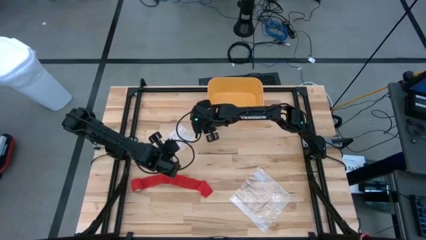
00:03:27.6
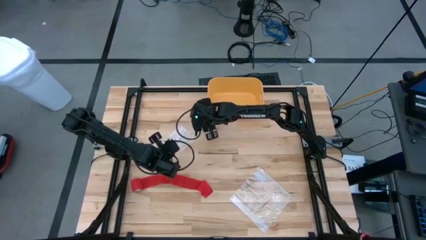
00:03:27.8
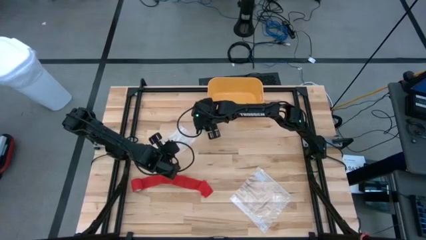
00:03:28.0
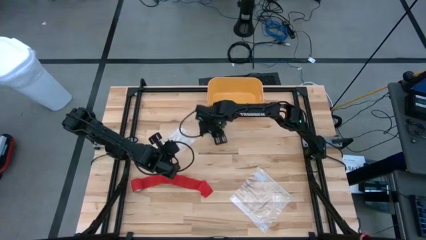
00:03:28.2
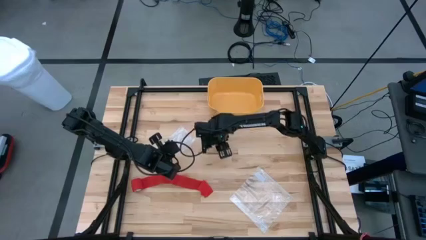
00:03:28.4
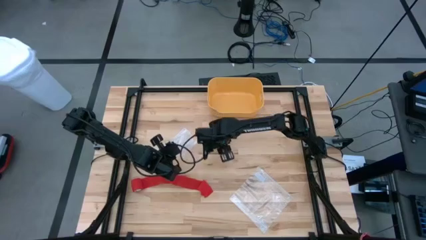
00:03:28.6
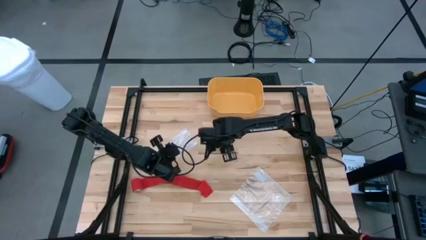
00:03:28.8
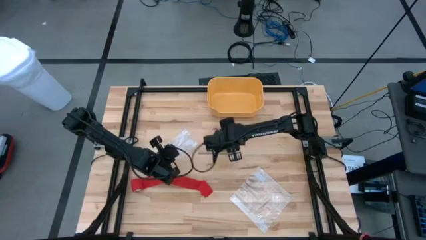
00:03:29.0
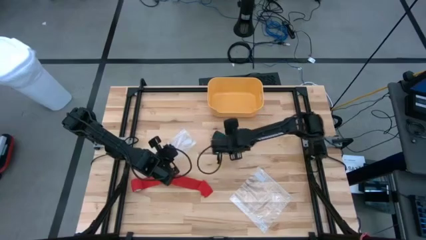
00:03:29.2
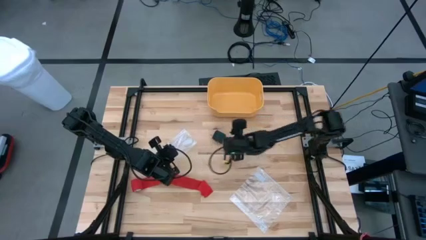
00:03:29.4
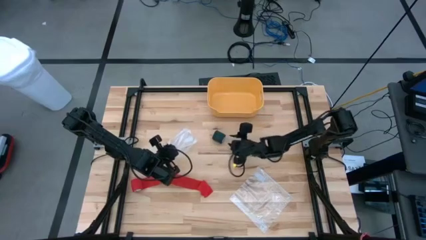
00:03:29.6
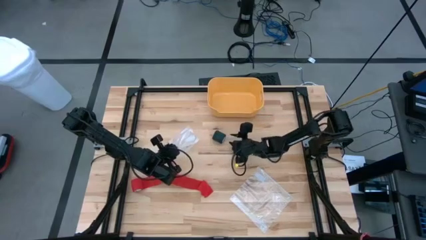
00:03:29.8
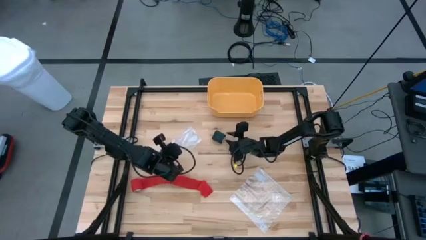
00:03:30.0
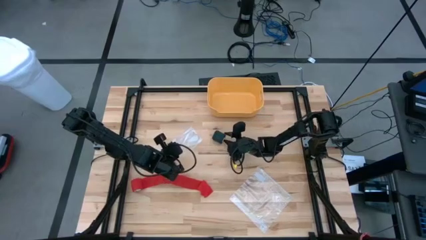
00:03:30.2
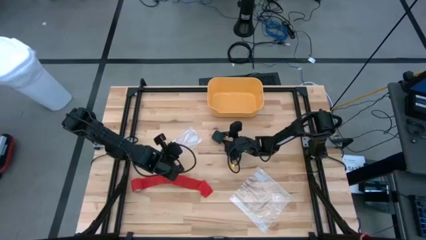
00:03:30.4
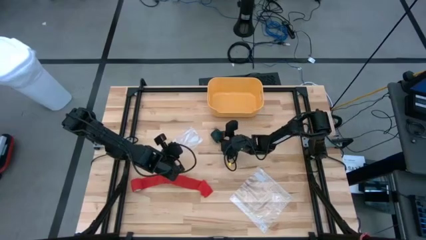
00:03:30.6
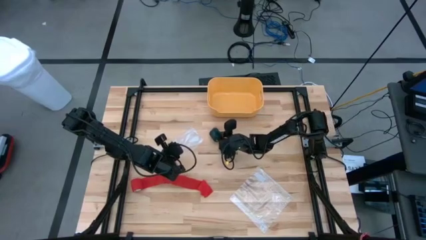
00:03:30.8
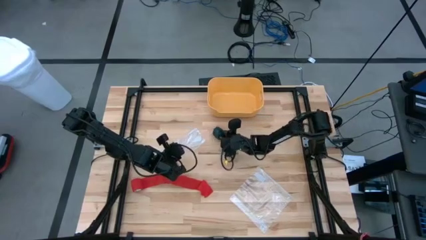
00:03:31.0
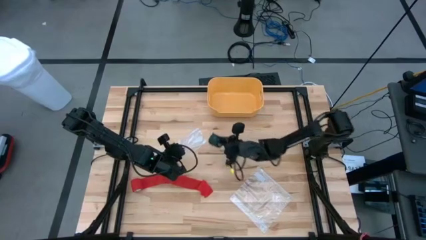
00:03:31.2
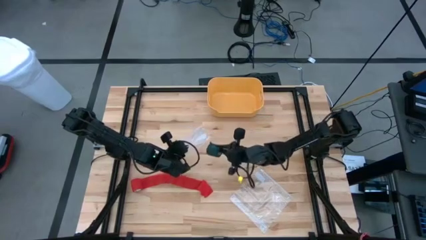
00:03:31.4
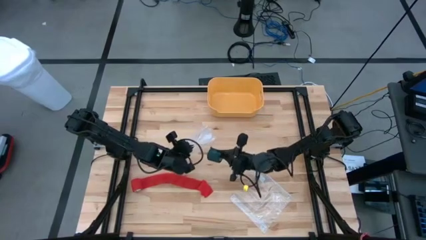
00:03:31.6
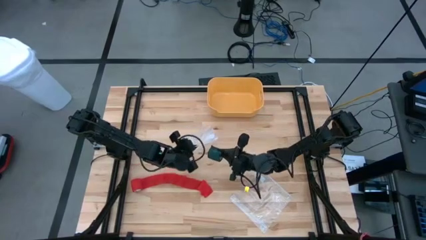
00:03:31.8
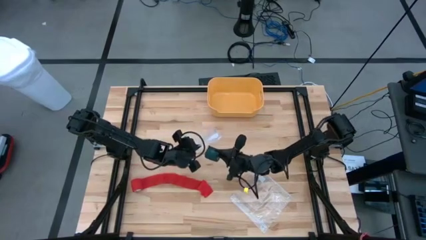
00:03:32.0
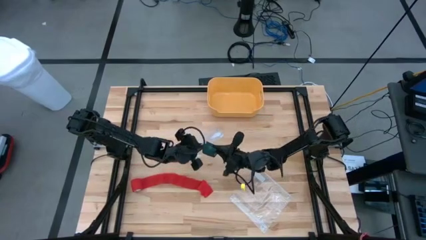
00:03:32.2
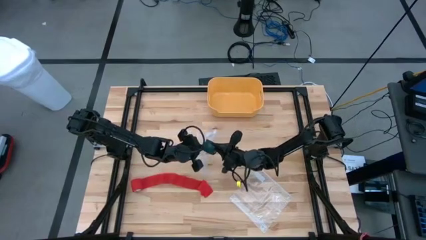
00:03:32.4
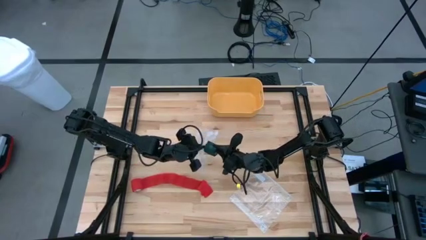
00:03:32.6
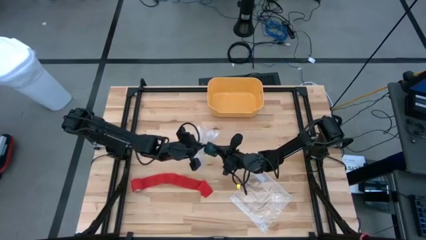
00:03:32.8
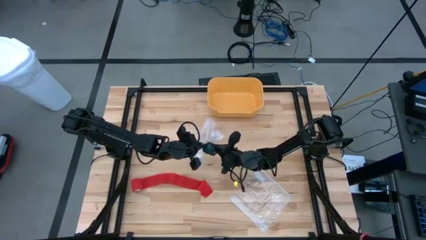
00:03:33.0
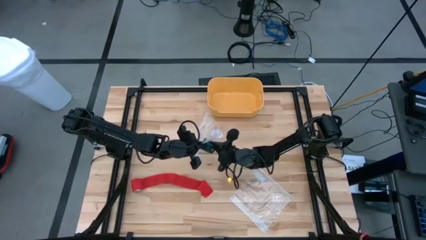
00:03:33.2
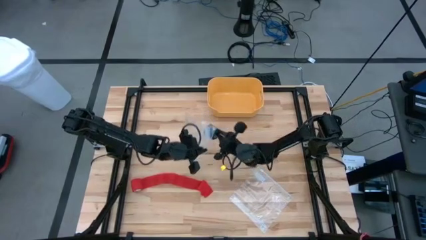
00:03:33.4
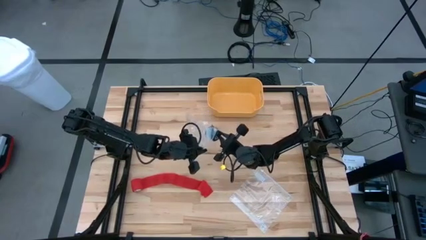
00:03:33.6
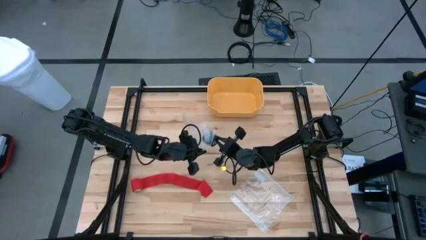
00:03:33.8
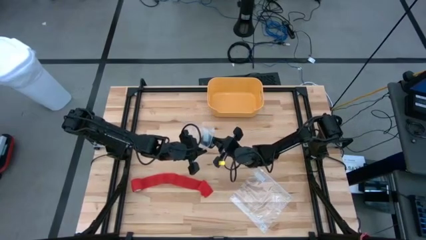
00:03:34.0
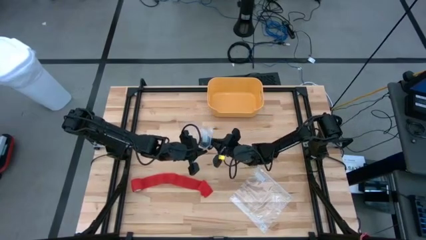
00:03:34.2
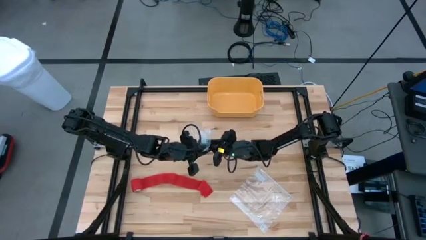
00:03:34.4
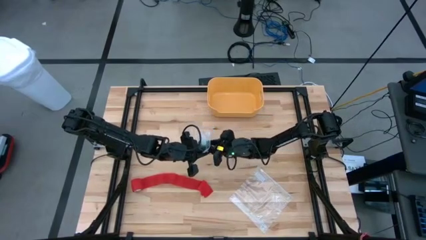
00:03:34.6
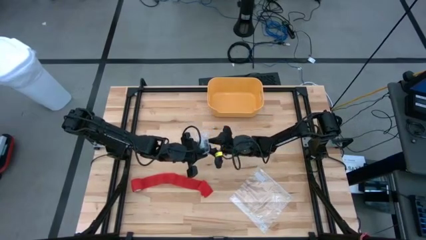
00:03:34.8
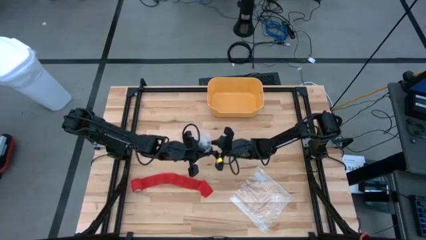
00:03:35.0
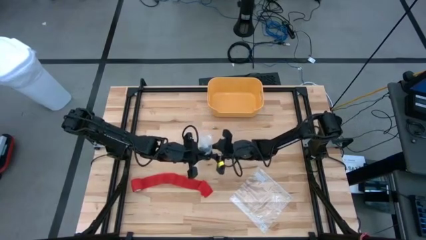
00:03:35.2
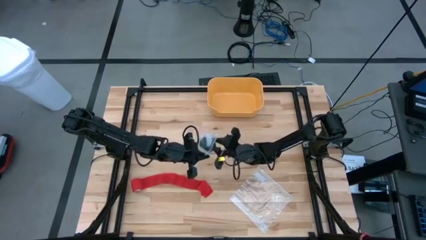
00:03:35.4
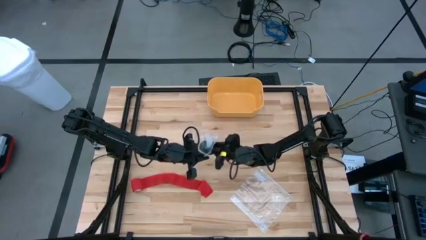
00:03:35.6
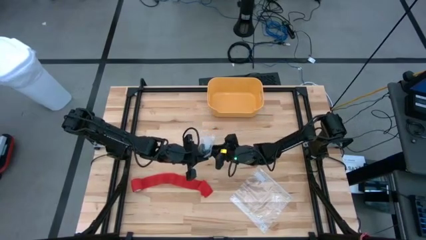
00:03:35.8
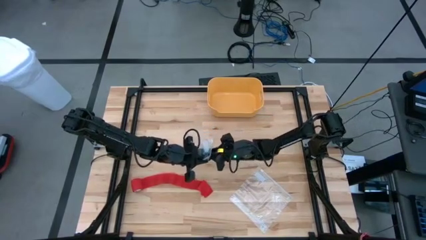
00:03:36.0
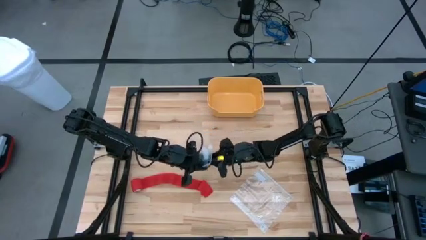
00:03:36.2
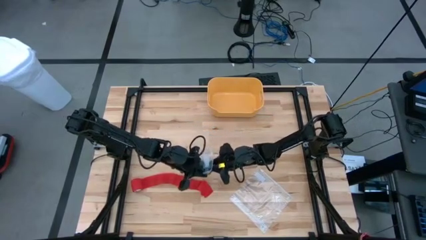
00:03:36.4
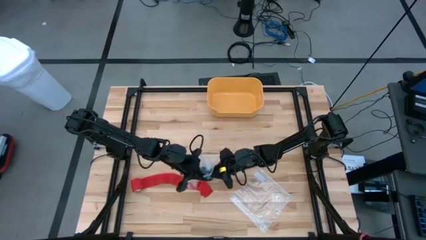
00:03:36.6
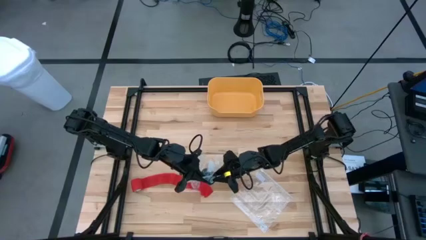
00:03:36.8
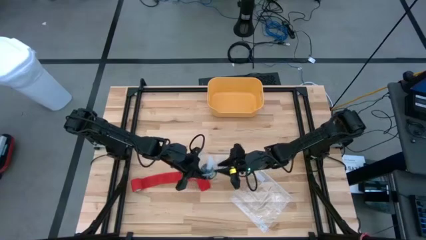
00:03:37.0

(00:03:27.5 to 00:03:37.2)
Task: Roll bandage
Put the rolled green bandage into the transparent zip bag

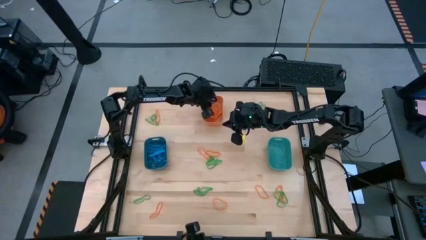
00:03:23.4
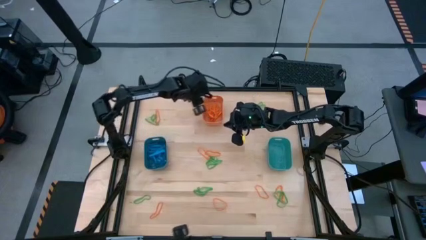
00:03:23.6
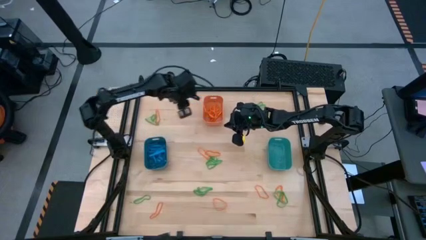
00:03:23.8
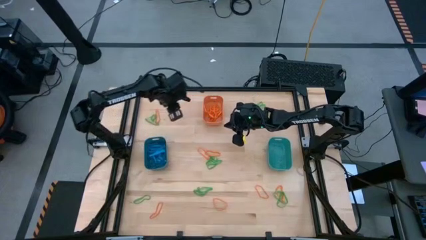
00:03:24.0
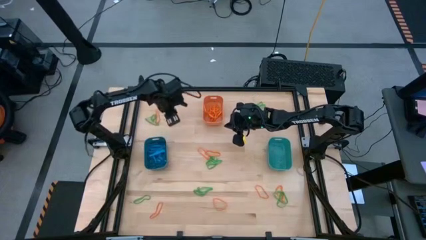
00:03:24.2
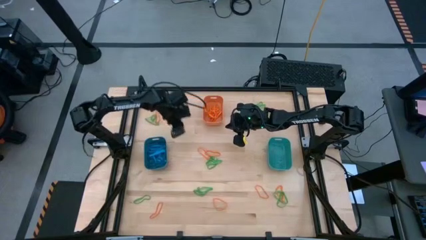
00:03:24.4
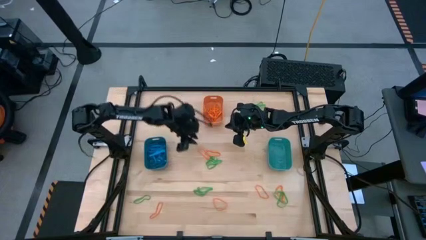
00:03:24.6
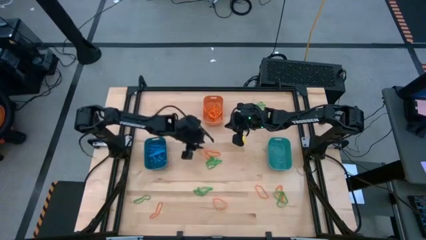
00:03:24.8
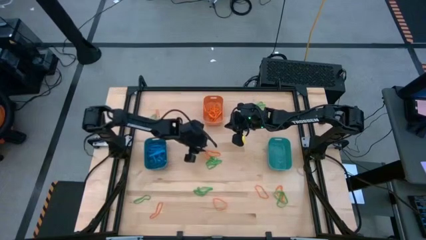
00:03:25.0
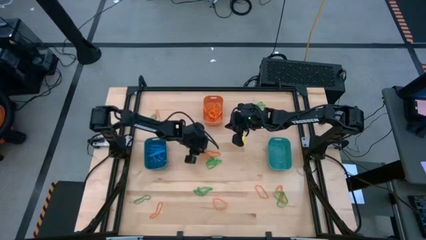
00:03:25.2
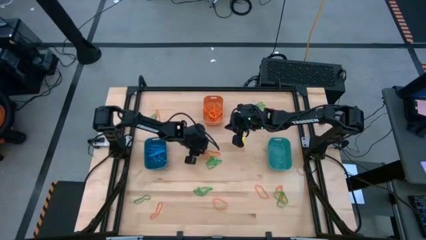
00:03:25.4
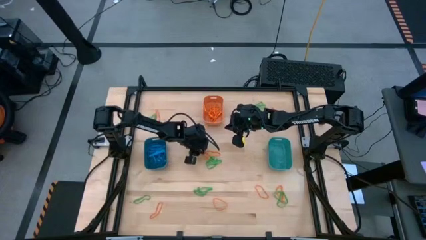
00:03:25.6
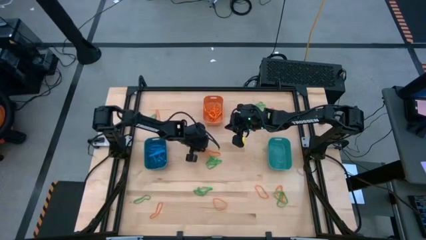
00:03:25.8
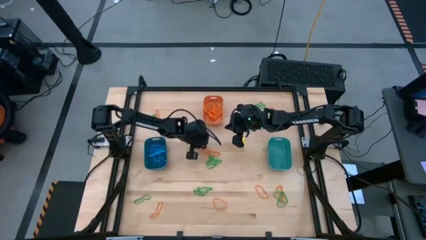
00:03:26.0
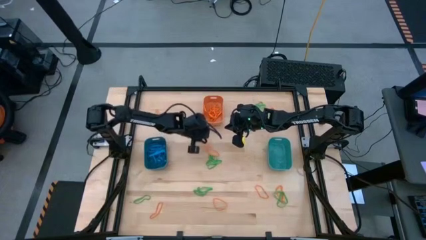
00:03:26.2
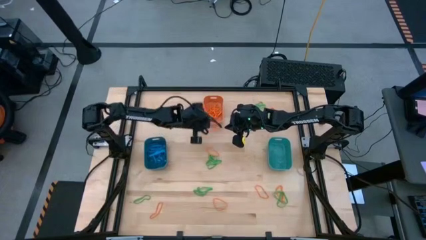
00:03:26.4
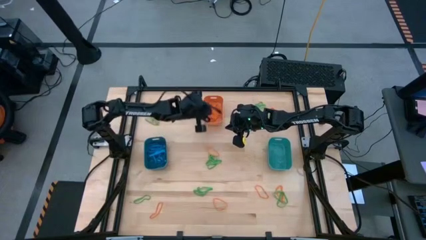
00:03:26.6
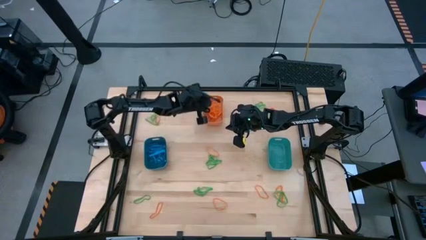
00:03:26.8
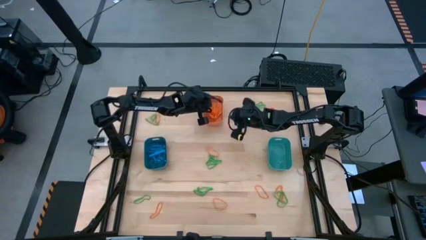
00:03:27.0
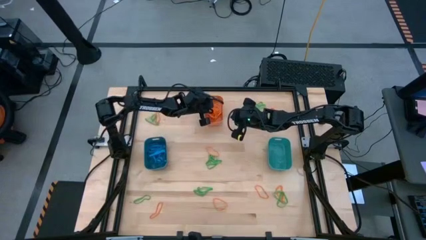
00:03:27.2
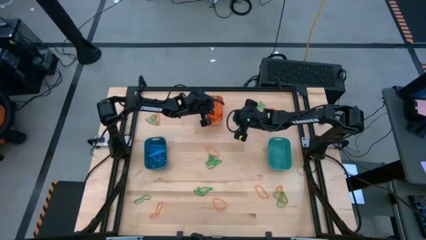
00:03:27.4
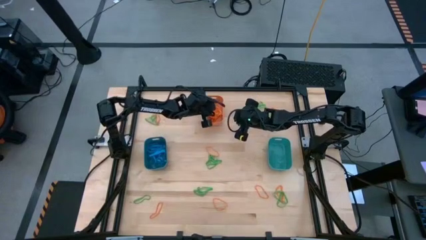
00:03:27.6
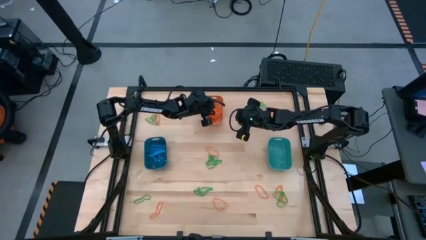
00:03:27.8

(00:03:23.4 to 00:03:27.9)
Task: Sort rubber bands into baskets
Put the orange rubber band into the orange bin
